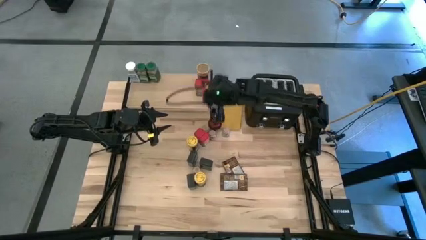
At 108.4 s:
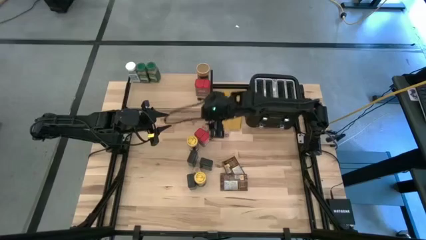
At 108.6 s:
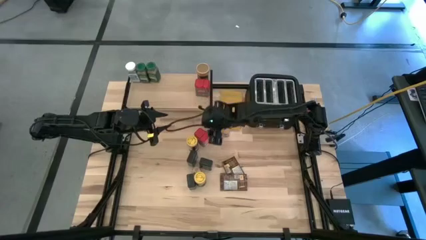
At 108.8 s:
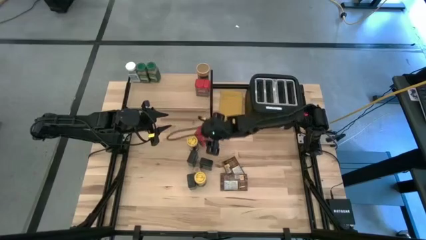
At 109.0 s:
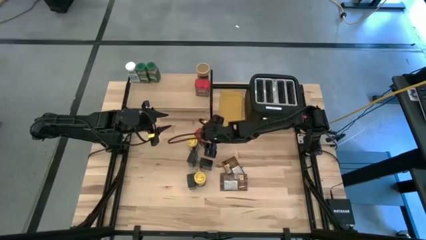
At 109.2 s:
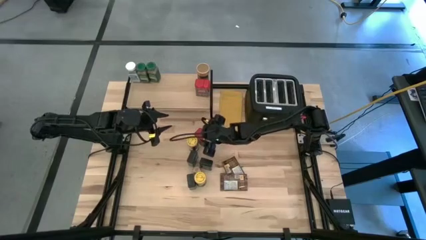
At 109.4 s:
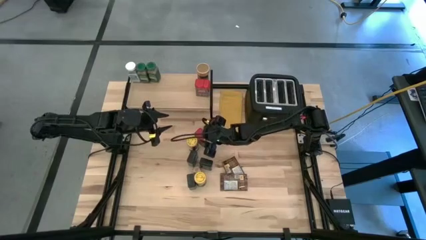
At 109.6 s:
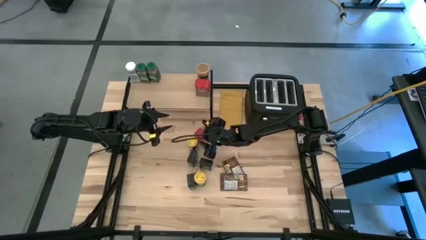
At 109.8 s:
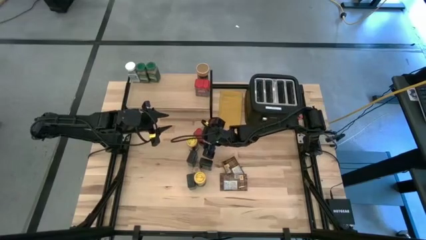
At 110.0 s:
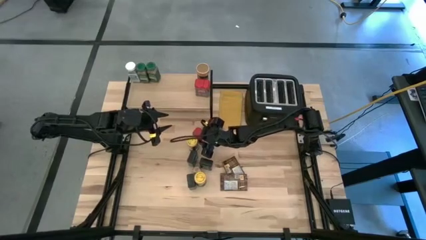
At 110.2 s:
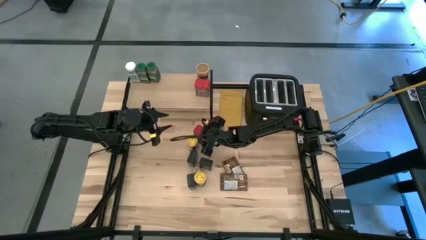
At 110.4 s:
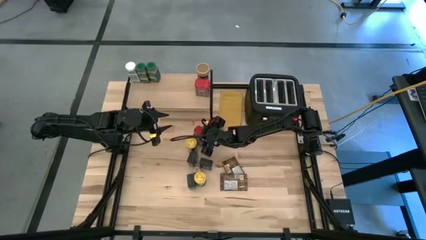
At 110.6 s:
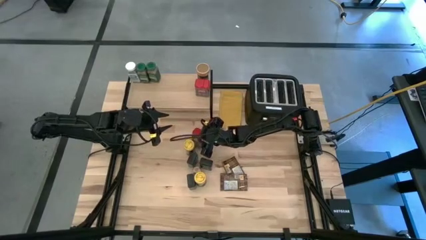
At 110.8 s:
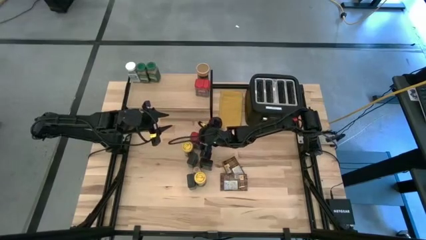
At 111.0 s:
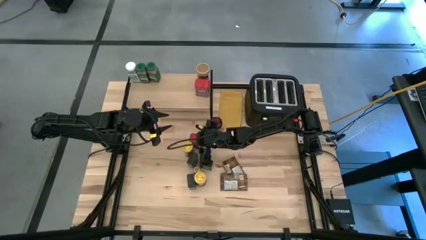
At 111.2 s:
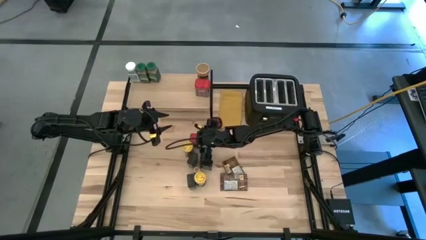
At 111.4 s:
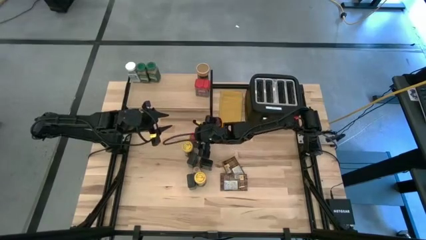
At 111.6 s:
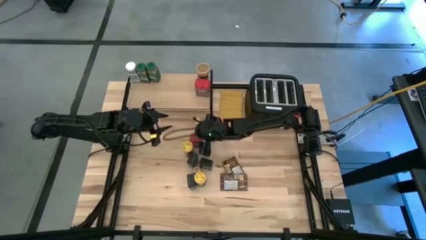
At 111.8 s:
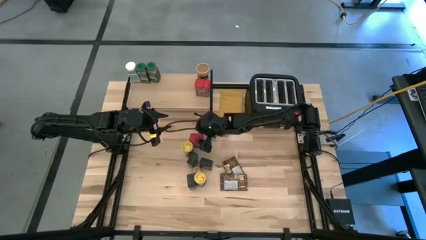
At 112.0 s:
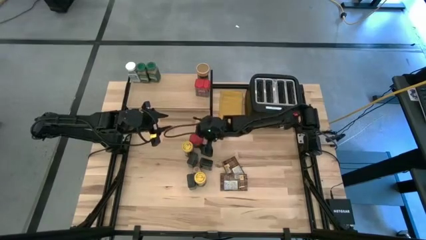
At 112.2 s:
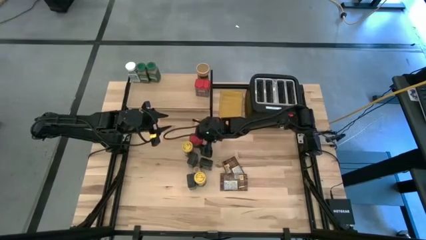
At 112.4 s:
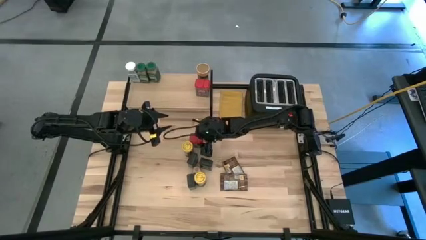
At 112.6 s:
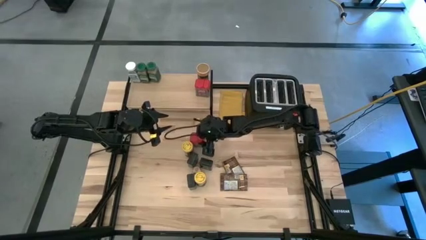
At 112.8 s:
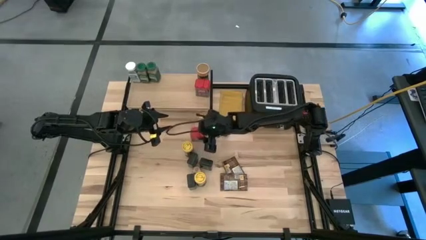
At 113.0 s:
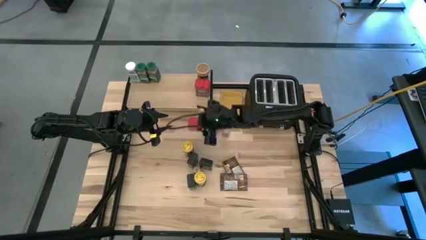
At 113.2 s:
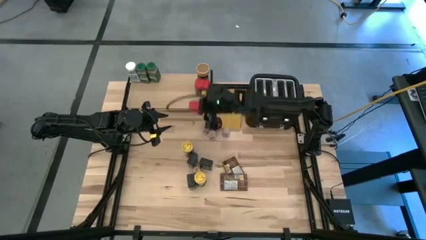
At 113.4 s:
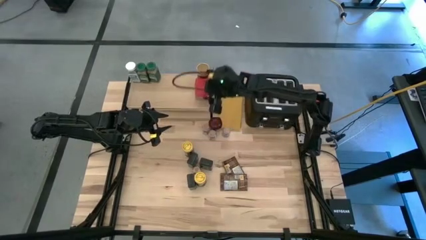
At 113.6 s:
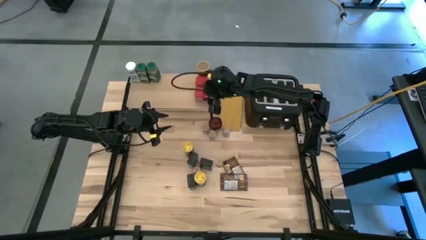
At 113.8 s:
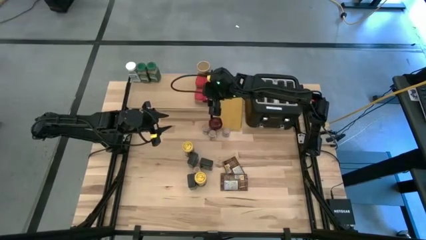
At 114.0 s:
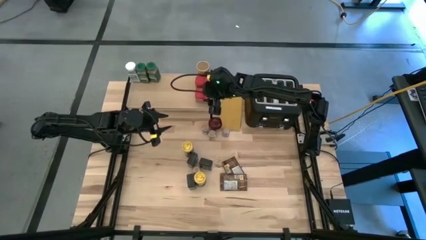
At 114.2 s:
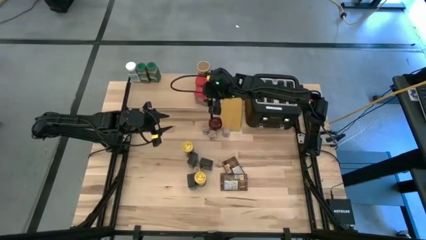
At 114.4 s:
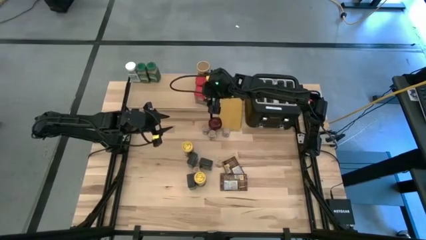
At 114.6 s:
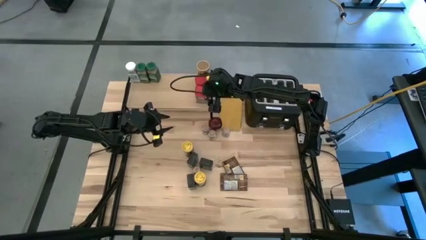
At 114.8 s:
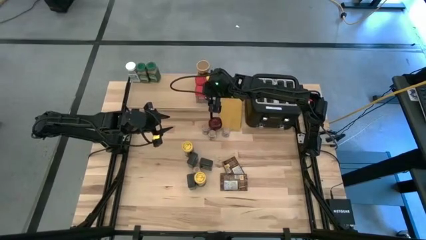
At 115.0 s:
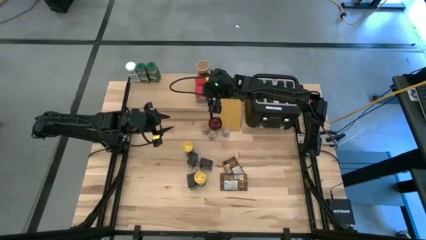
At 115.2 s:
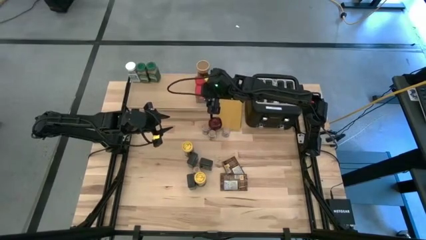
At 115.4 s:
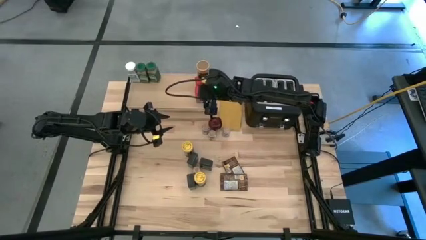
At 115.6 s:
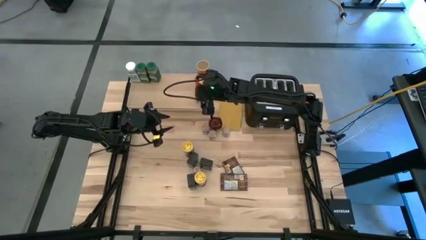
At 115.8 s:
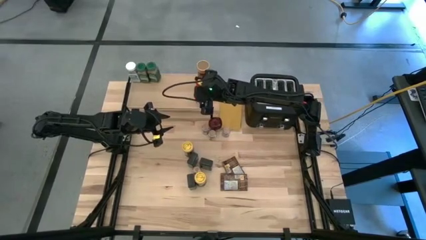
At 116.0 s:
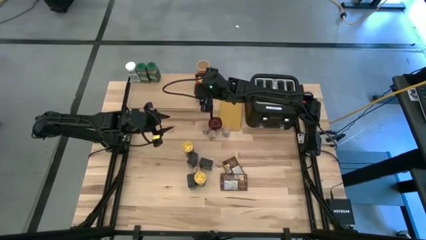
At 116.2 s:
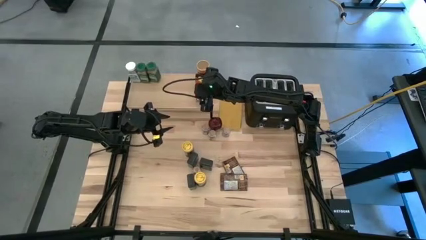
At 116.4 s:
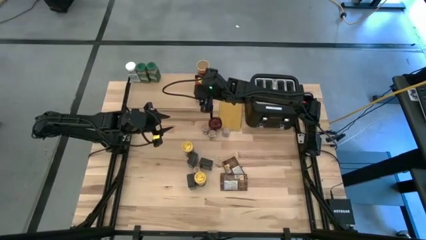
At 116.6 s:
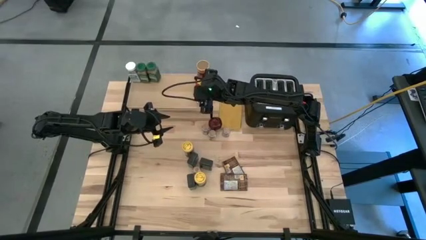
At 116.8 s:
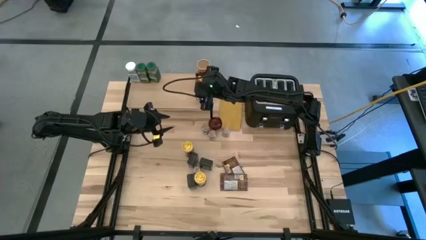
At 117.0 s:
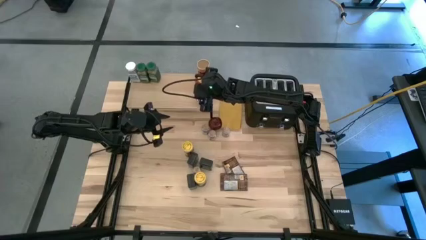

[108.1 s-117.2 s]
Task: Shelf spices
Put the red seasoning can on the shelf aligned with the other red seasoning can on the shelf

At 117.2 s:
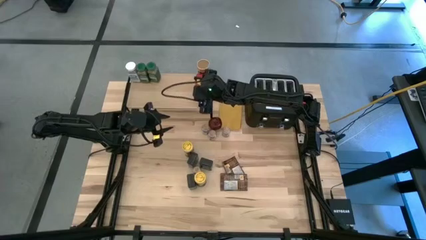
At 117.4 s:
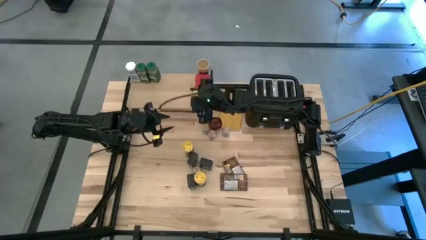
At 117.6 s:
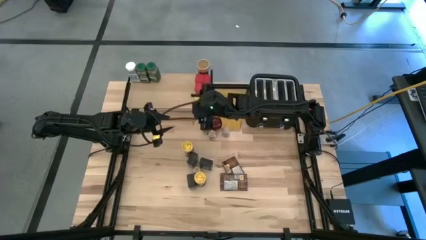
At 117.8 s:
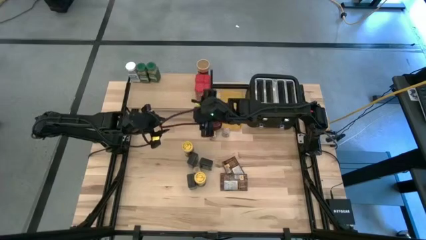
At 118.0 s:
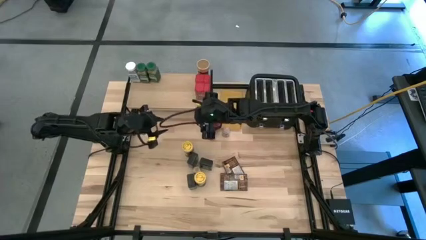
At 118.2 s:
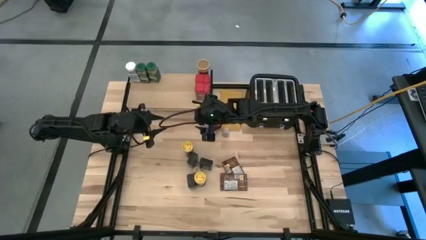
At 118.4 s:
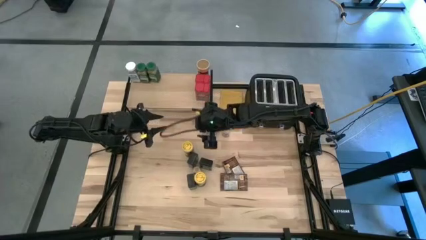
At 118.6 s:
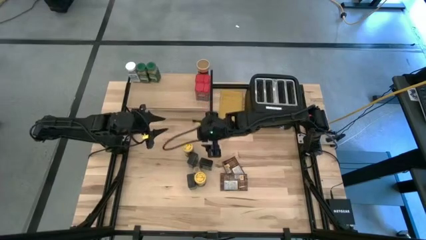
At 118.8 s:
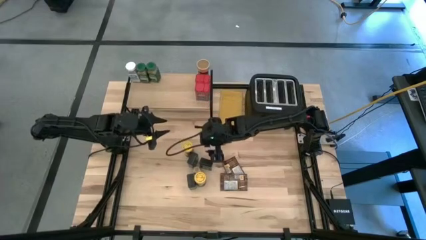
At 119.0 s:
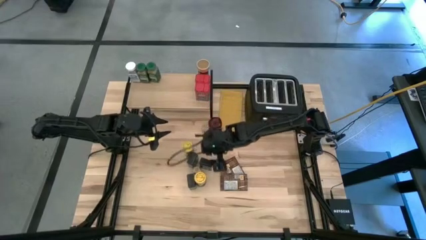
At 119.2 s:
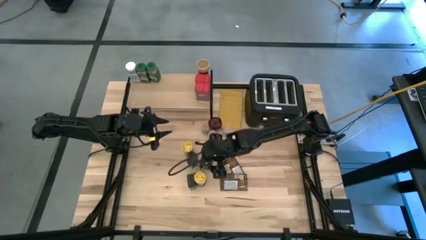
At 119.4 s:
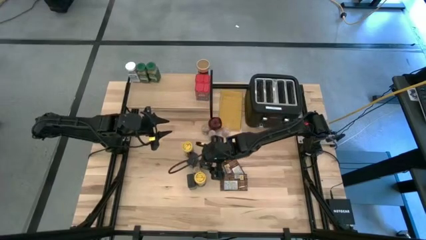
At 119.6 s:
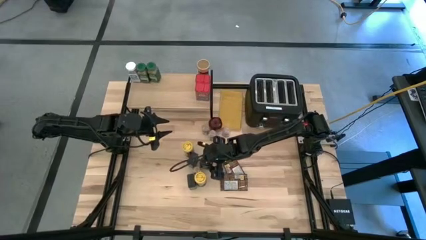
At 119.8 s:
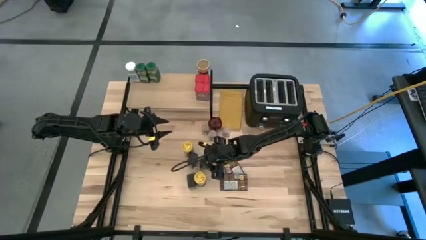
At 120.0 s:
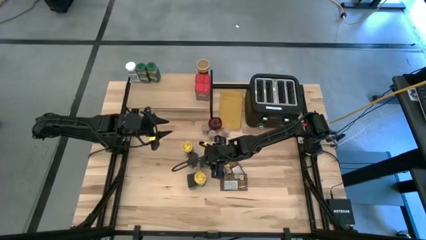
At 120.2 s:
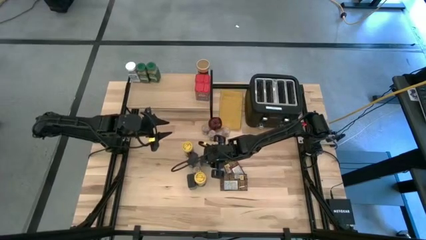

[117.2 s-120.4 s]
Put the top right black seasoning can on the shelf

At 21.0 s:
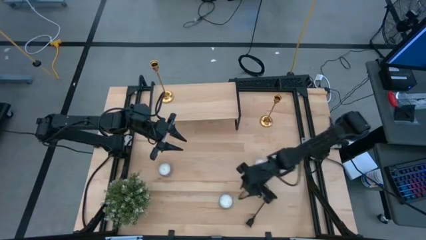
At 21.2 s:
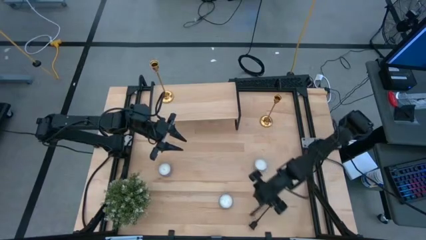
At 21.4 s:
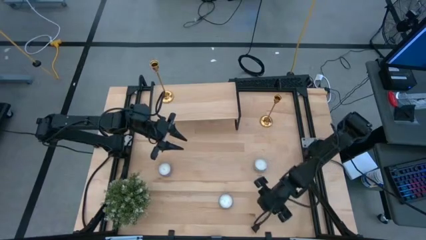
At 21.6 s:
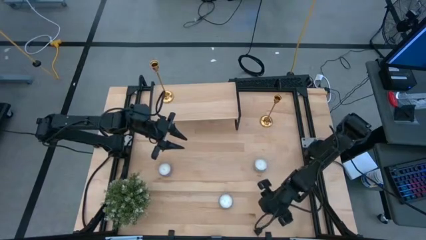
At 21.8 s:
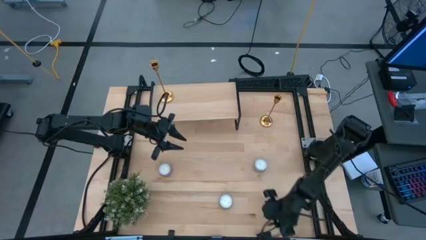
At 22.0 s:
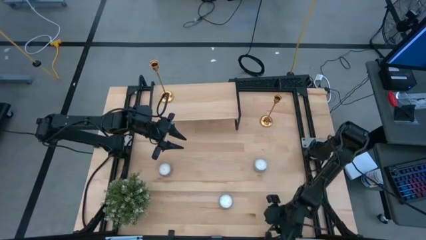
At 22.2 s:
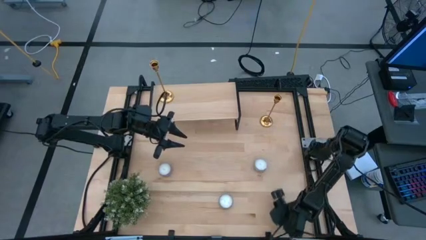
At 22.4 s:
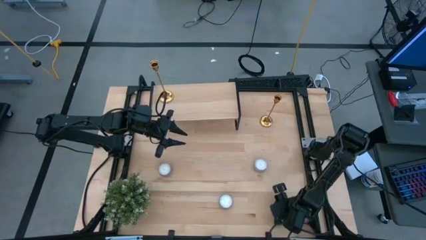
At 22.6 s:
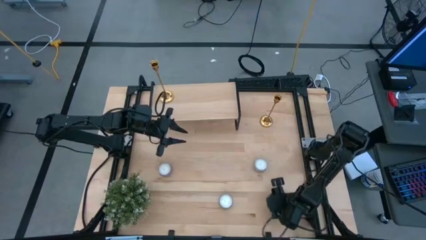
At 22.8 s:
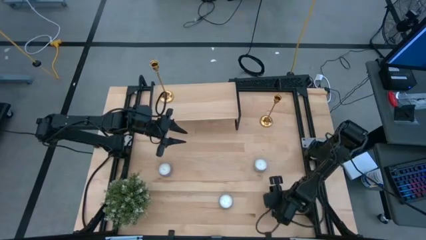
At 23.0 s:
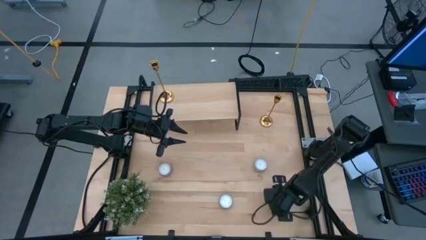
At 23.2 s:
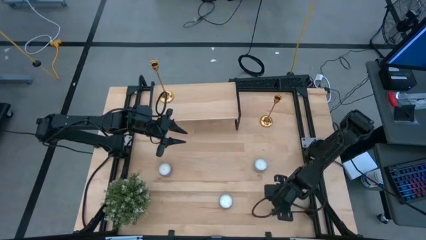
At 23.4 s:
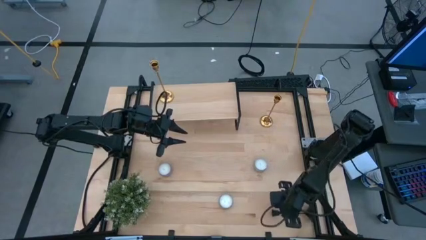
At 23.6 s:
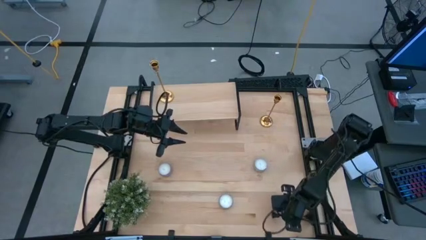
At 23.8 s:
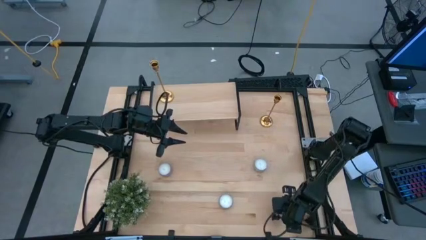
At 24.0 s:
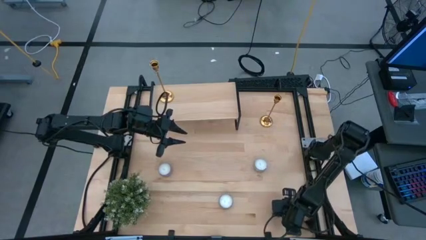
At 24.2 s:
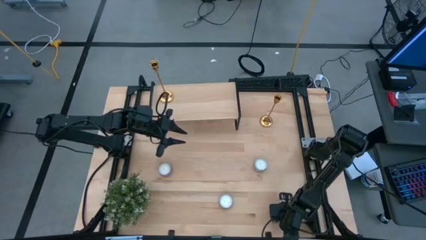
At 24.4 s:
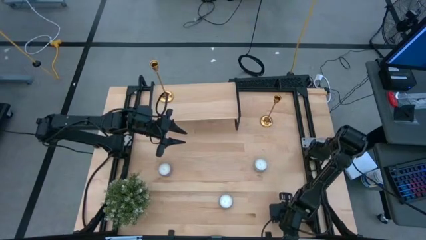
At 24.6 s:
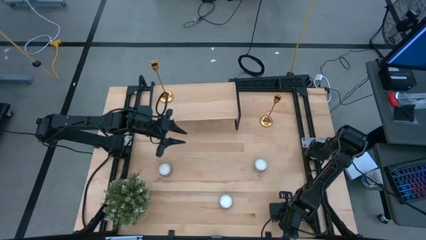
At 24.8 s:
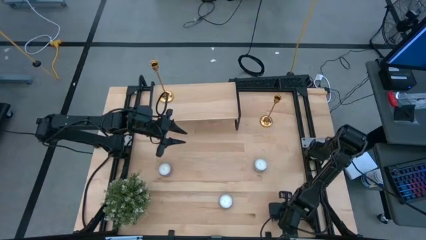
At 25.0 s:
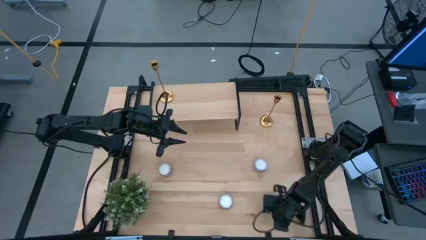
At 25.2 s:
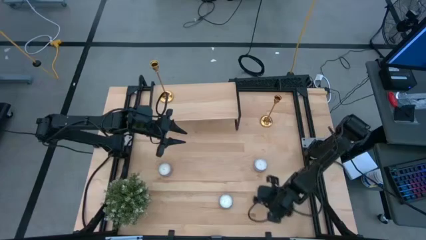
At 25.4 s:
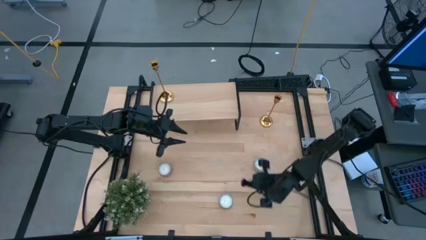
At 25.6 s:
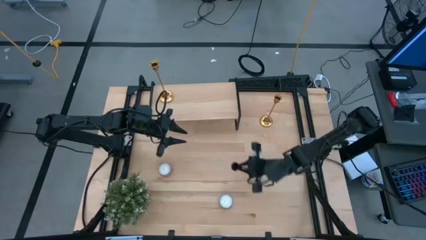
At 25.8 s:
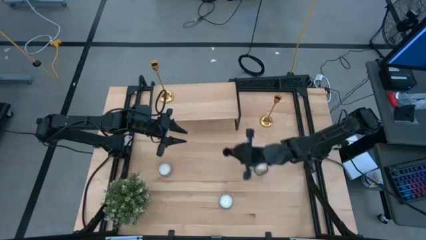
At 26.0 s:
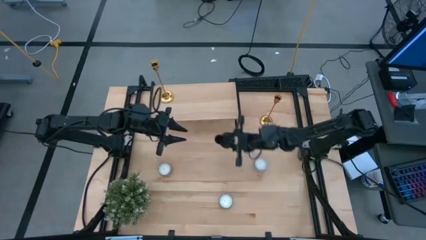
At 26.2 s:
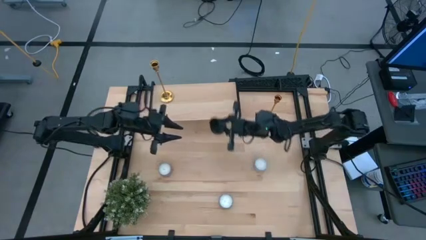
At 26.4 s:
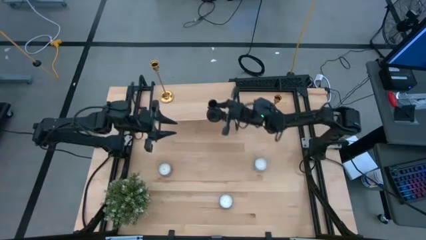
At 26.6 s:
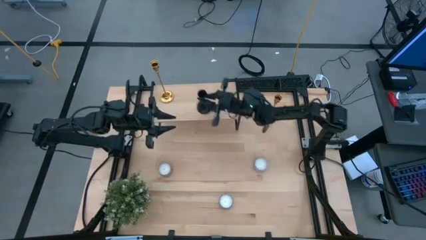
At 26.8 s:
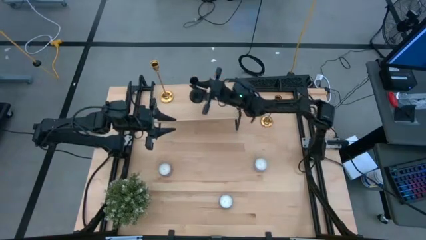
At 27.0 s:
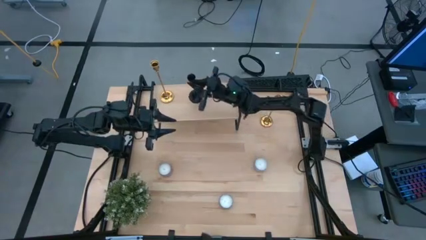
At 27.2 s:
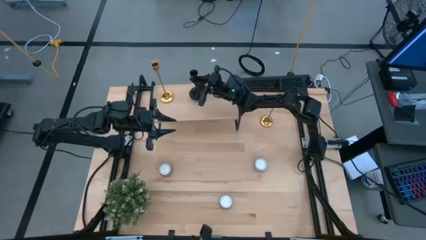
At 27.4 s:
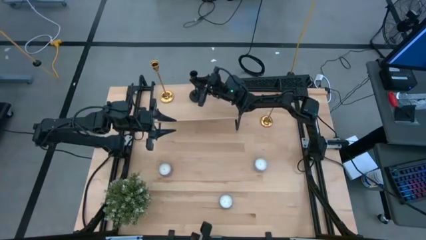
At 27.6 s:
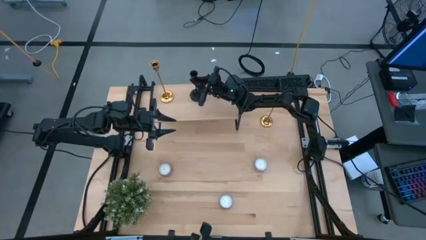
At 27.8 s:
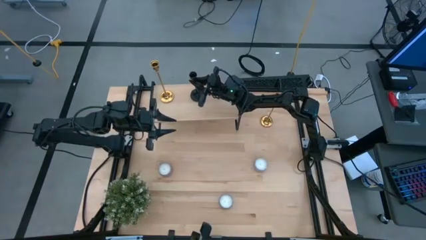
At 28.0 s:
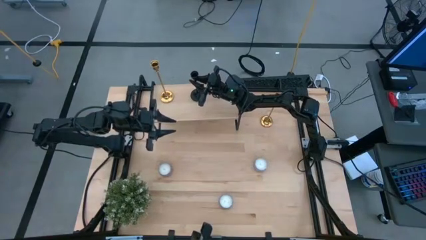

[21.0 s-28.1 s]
Task: Pick & Place candle stick holders
Put the black candle holder on the shelf aligned with the other candle holder
